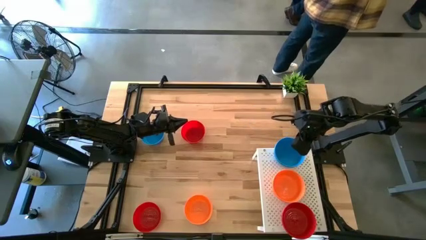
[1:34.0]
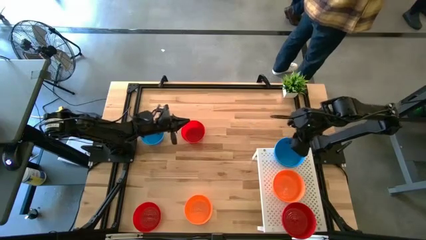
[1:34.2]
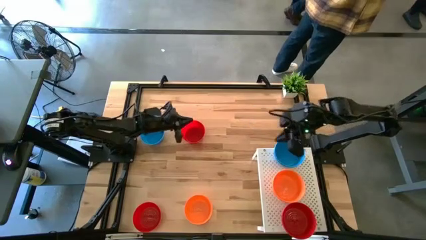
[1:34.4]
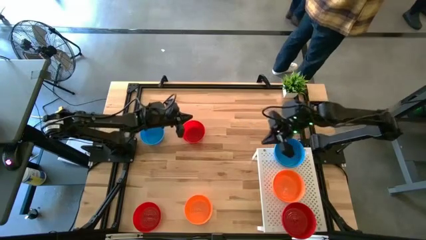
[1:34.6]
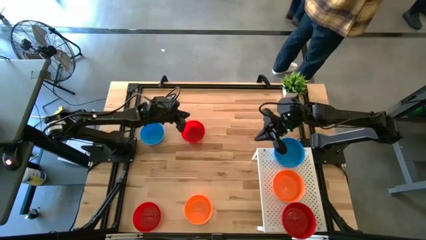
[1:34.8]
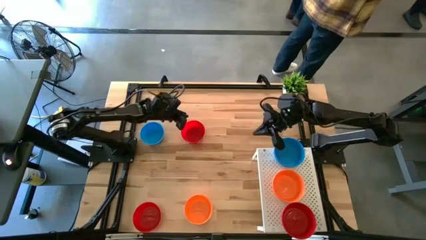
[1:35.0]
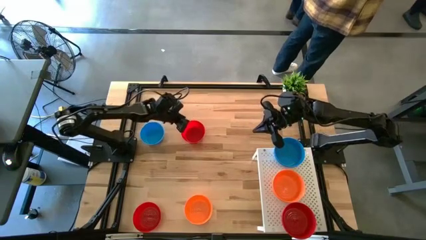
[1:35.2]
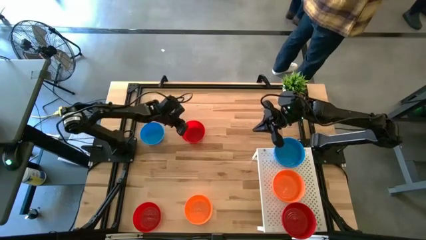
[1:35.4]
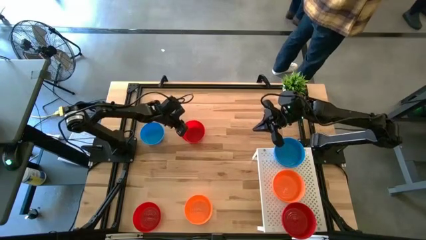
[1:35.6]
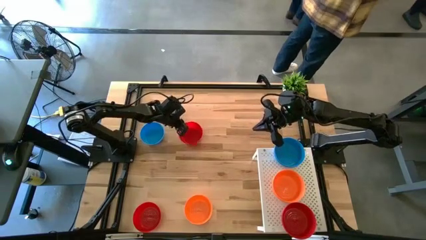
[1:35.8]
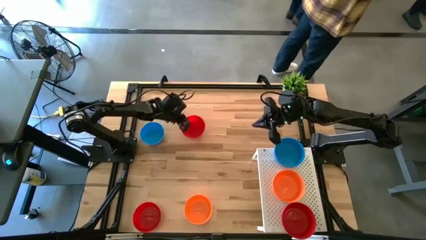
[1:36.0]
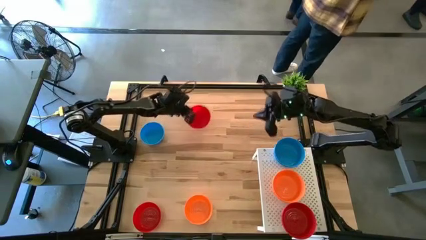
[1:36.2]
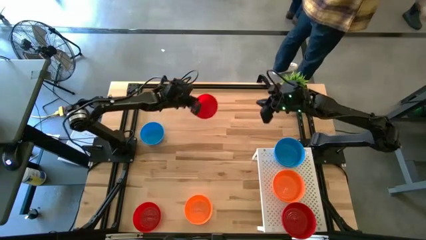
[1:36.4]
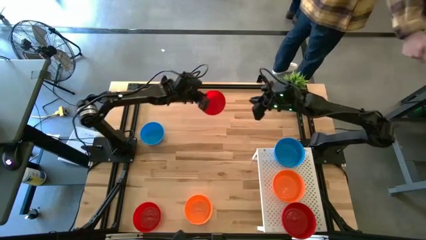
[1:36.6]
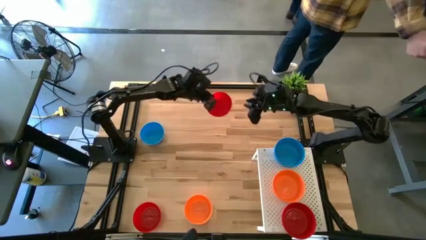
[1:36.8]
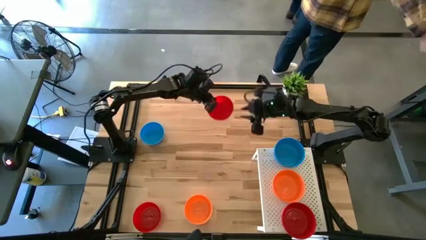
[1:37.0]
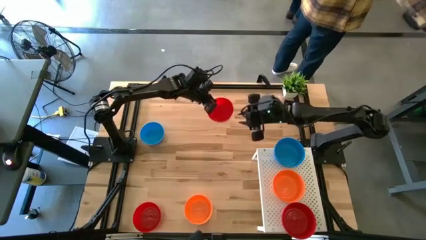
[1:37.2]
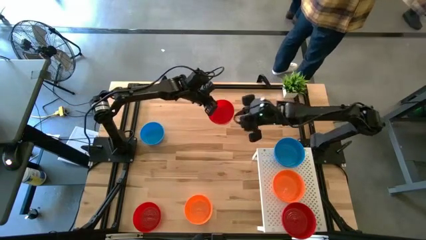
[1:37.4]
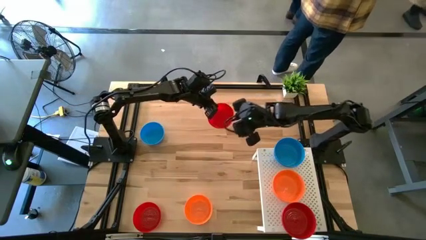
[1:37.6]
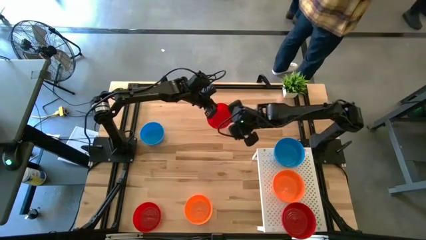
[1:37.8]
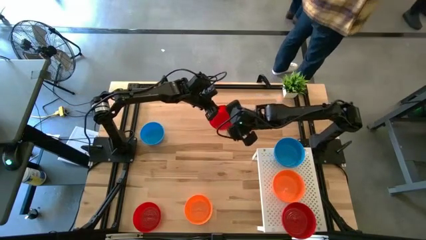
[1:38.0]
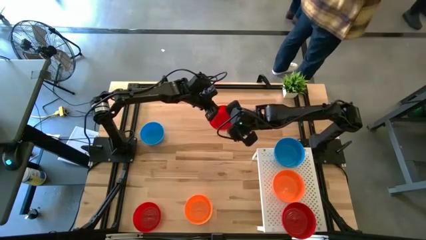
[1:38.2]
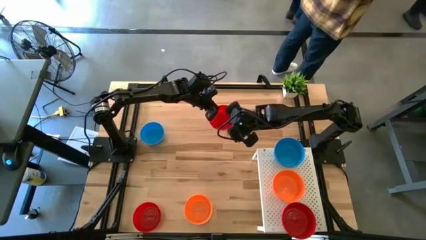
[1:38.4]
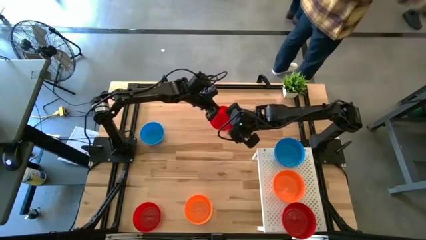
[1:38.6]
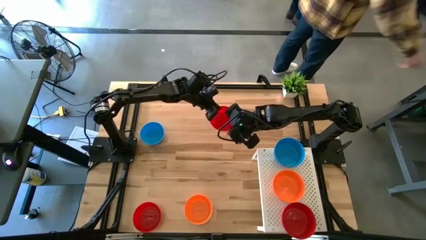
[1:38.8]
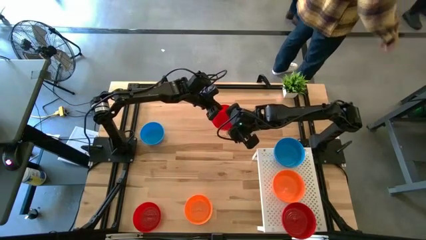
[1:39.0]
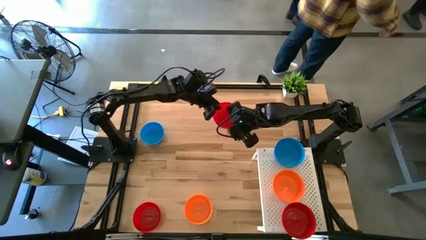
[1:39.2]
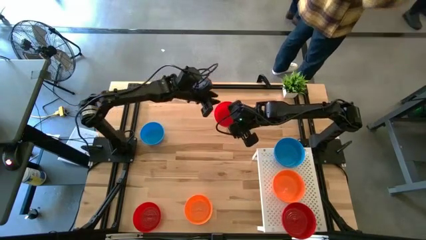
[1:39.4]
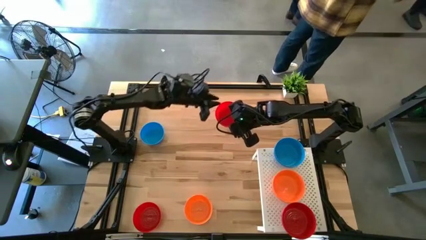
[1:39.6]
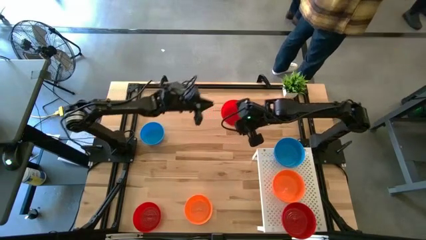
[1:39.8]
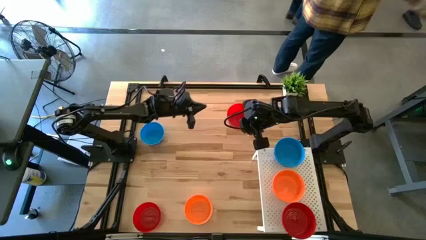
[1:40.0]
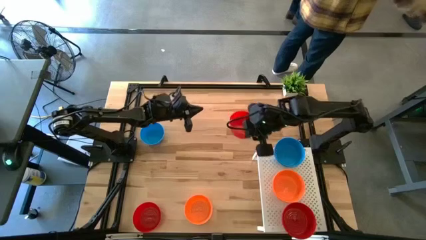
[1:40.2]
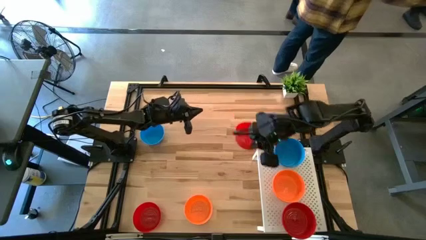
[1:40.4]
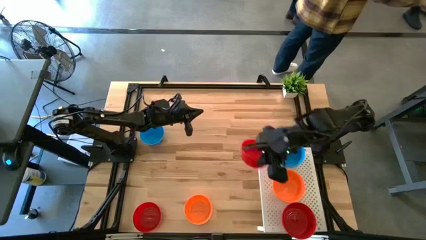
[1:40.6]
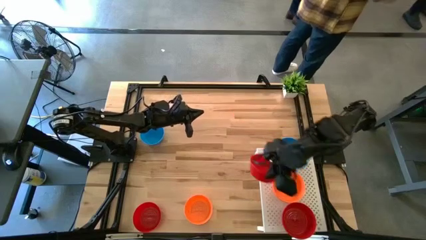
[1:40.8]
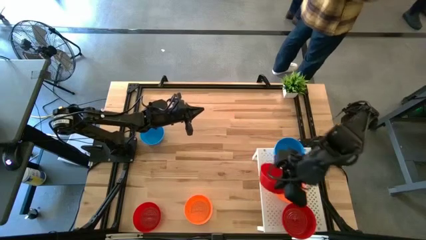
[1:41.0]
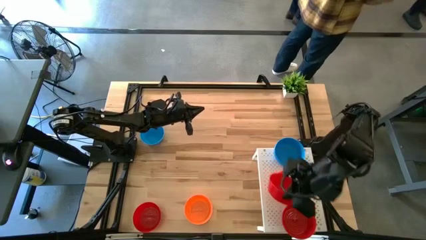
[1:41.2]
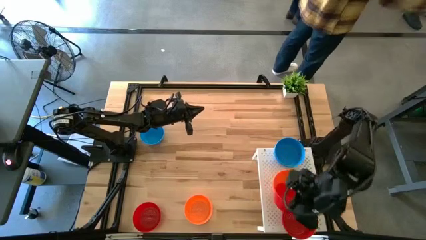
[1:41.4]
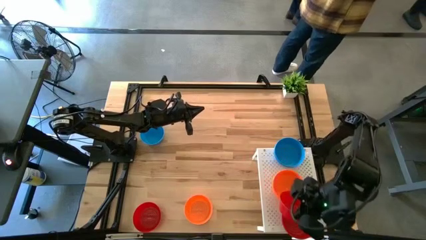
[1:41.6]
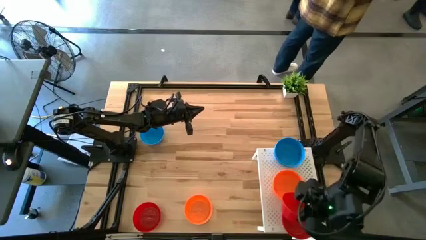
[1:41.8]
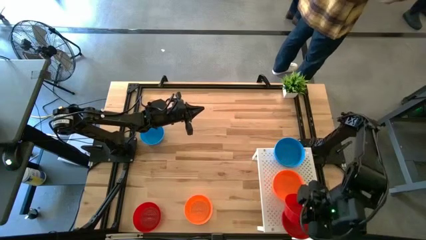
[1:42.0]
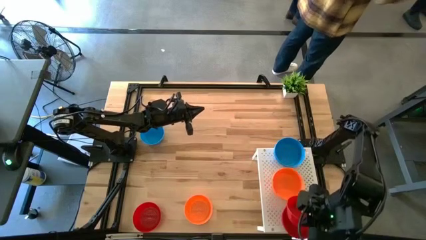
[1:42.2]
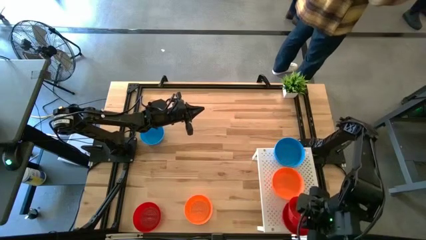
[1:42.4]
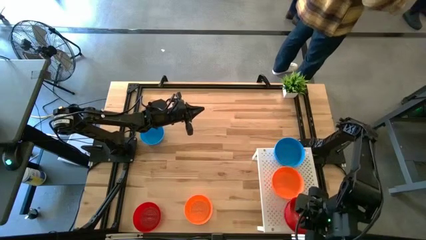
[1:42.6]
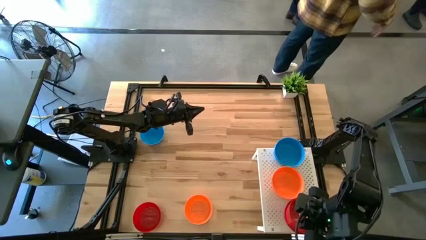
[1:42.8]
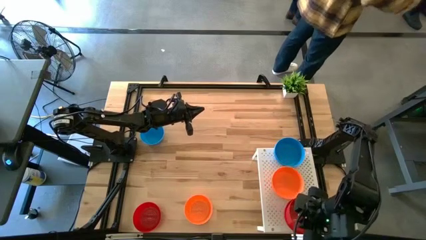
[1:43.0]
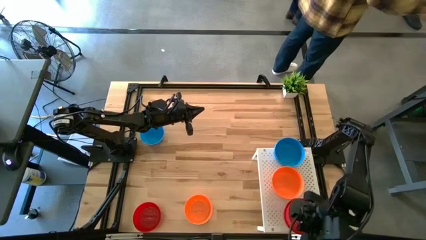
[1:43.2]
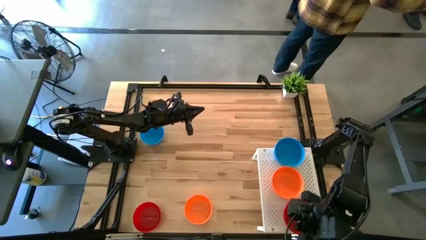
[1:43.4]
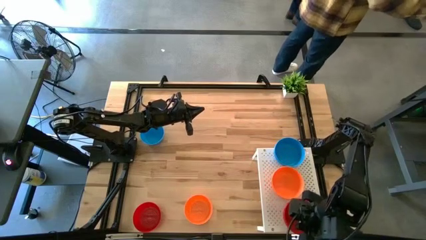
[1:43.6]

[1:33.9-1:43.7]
Task: Pick & Place Mini bowls
Stack the red bowl on top of the other red bowl on the shelf

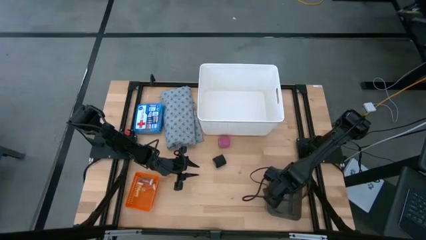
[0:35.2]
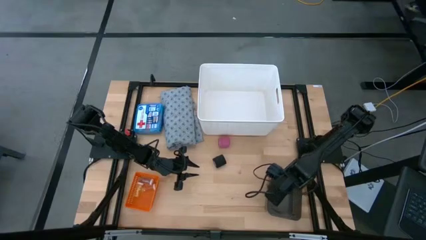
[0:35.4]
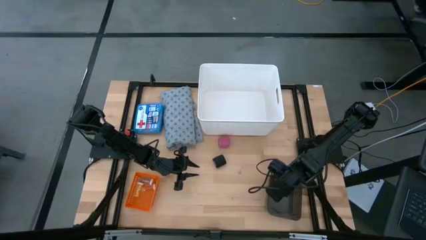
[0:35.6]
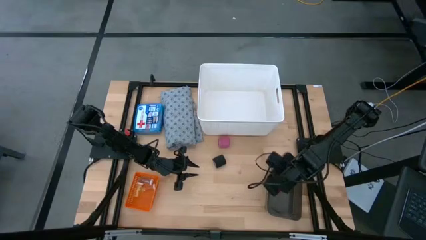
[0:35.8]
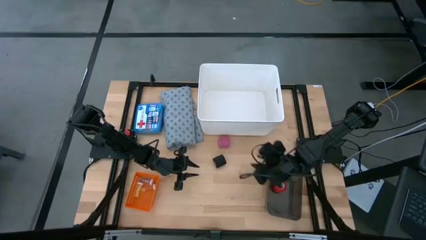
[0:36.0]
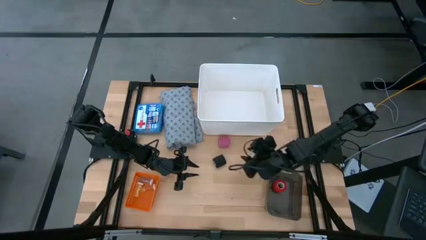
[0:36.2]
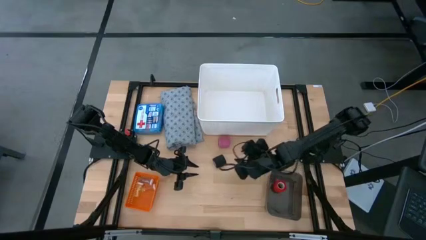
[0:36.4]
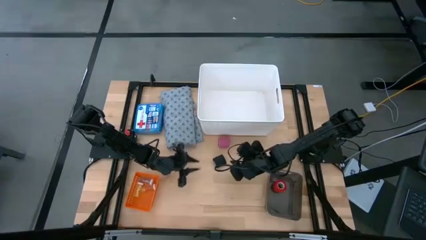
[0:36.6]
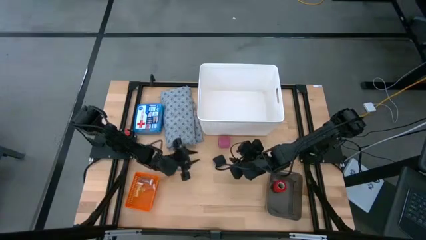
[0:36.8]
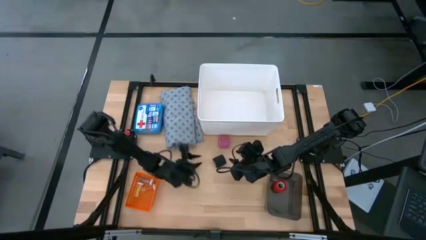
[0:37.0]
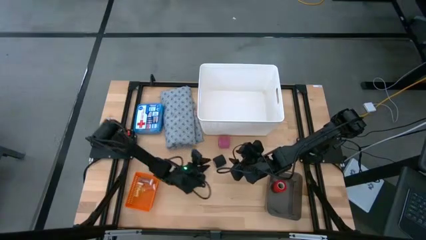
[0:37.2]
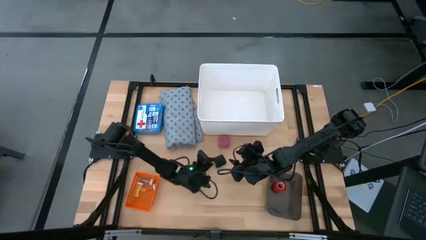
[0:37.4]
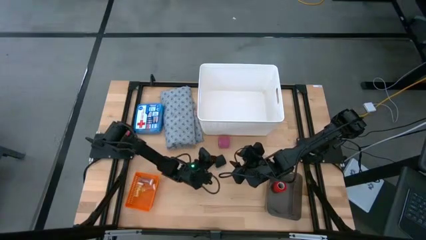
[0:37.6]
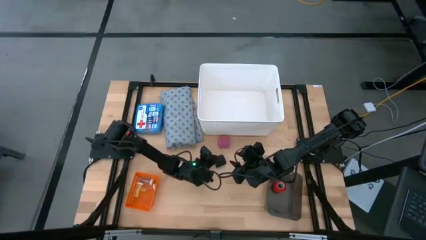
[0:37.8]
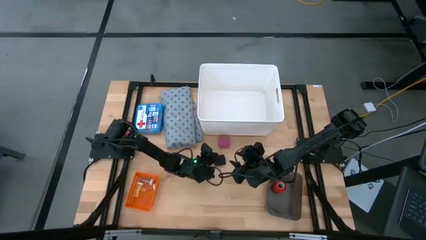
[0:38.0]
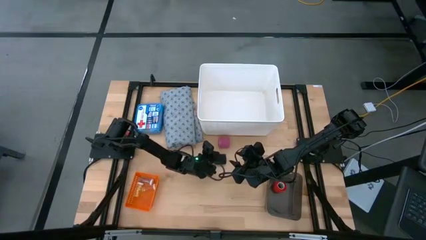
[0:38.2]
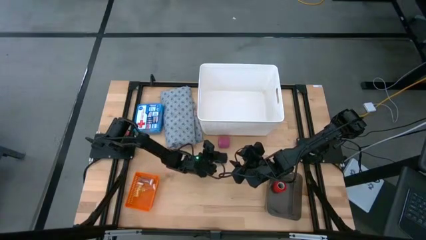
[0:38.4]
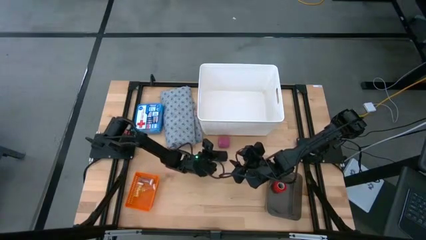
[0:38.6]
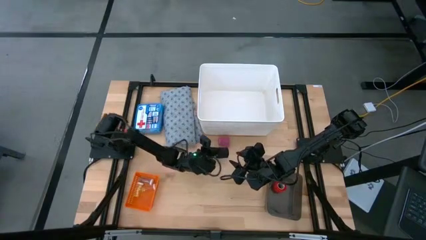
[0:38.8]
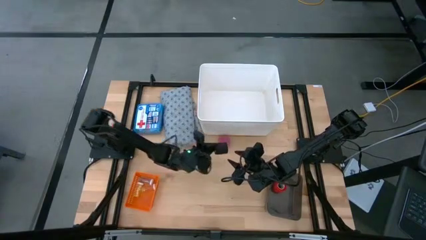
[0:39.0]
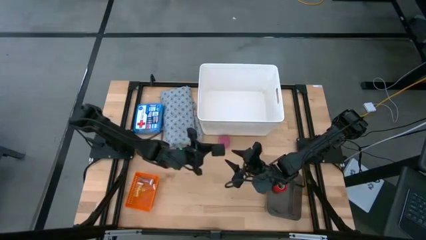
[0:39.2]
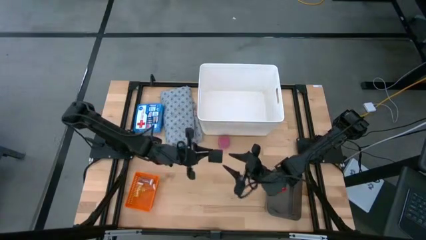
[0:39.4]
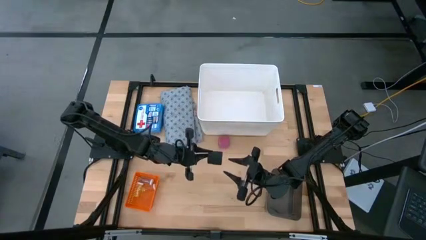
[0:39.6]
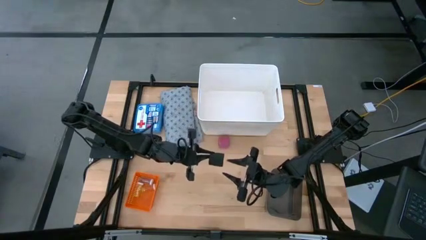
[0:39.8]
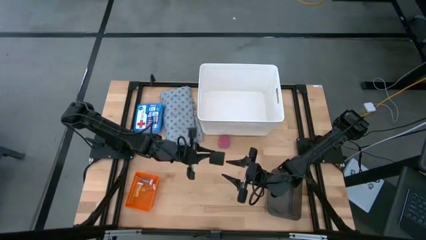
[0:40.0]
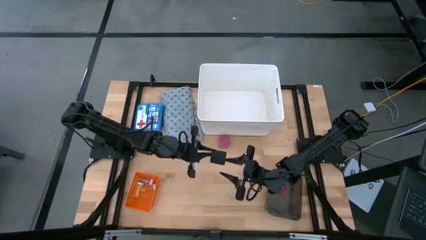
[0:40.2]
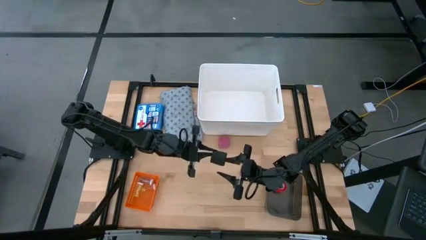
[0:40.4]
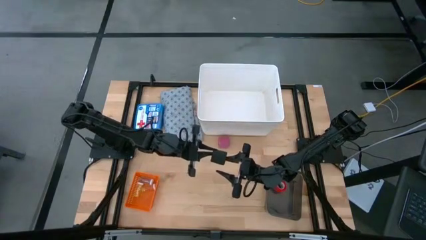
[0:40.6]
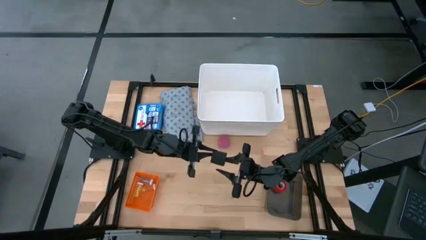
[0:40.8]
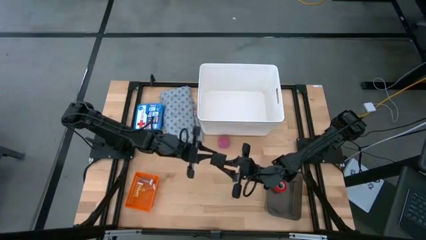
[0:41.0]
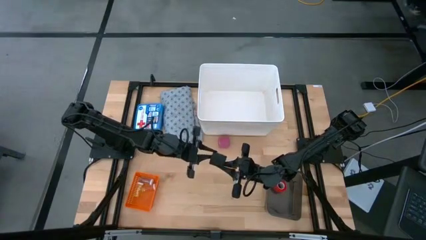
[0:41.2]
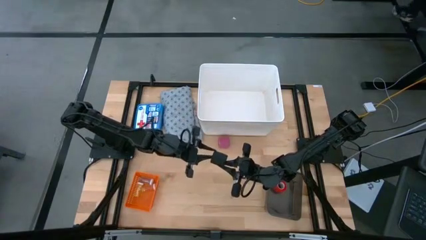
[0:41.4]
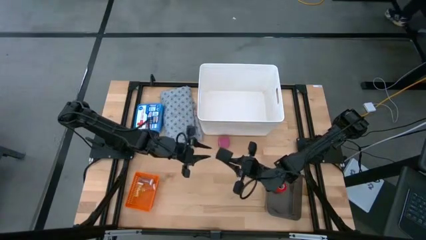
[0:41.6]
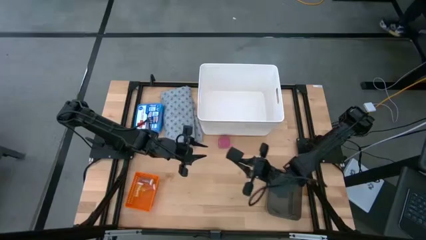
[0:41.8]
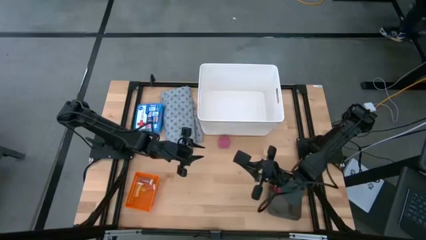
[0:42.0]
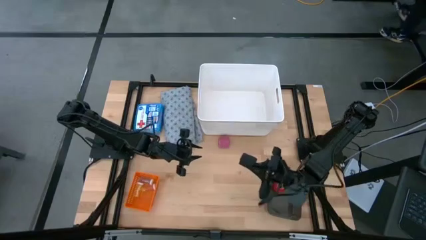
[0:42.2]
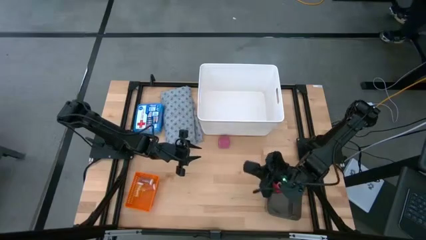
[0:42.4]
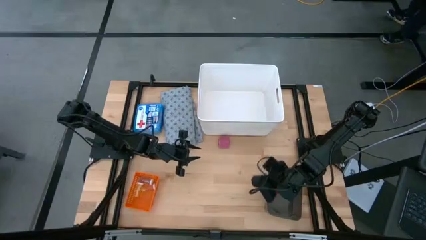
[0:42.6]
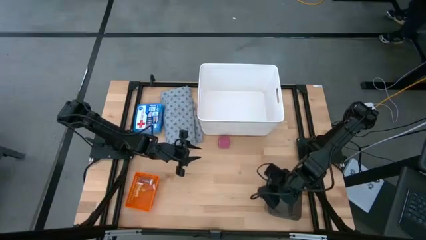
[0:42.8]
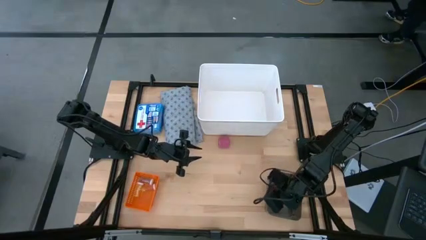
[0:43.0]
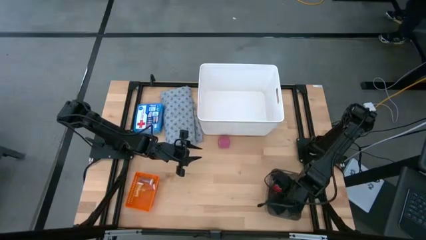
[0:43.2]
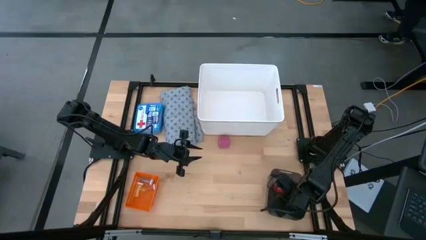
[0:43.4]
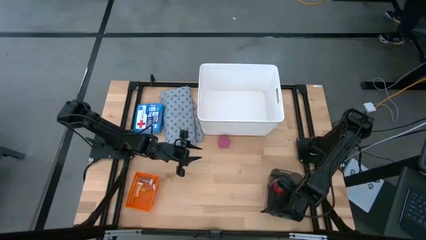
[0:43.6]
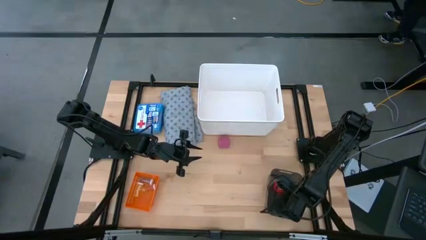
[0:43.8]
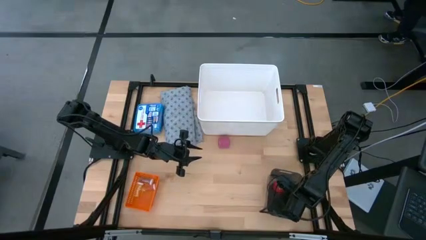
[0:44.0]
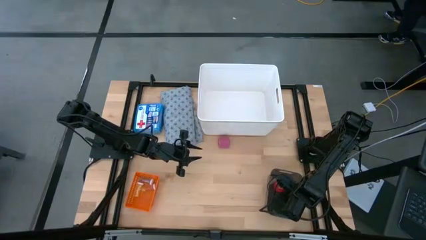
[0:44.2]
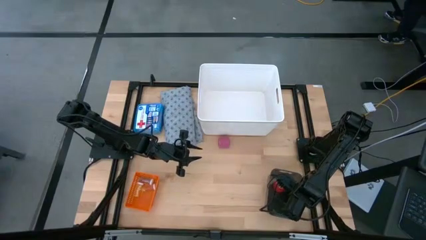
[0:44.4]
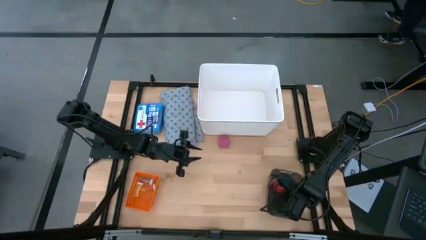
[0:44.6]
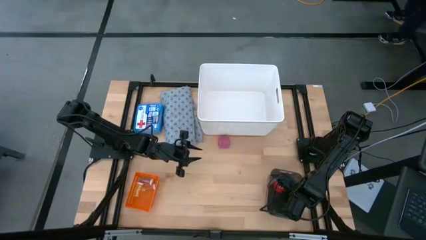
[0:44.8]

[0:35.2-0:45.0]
Task: Pick & Place Medicine items
Put the black bandage into the black bin
